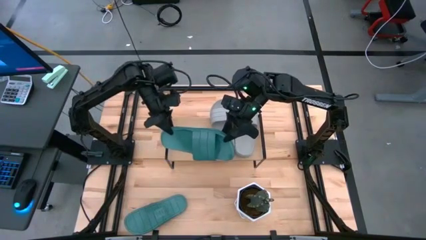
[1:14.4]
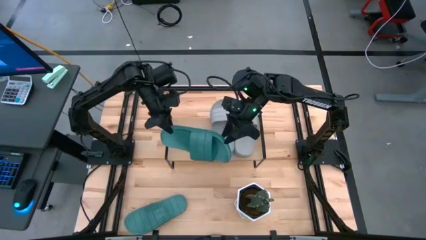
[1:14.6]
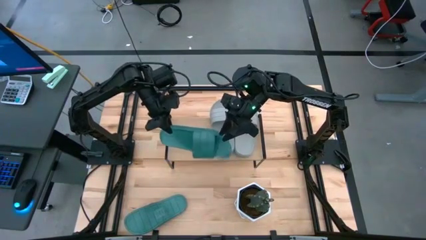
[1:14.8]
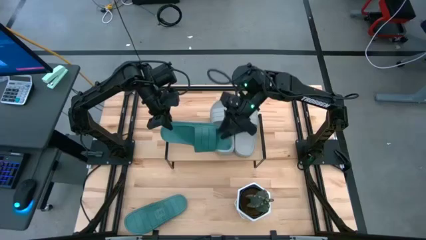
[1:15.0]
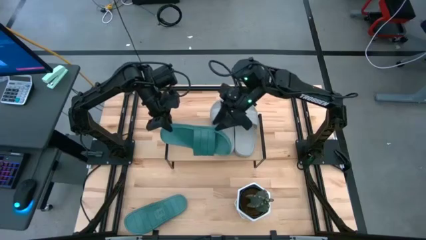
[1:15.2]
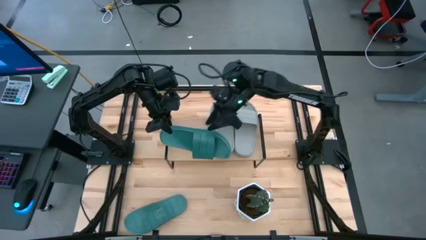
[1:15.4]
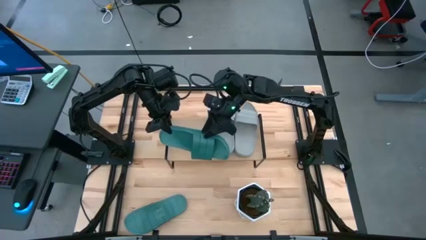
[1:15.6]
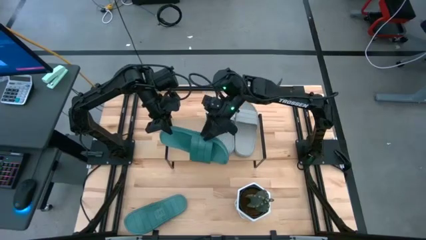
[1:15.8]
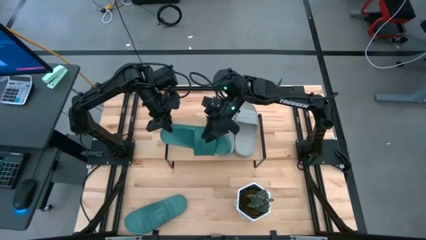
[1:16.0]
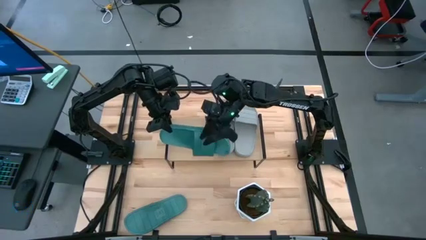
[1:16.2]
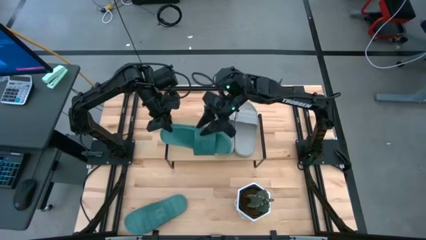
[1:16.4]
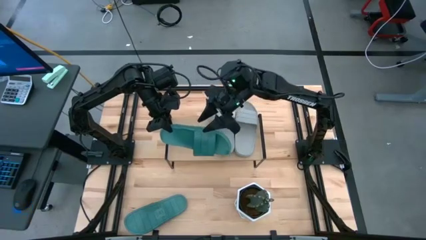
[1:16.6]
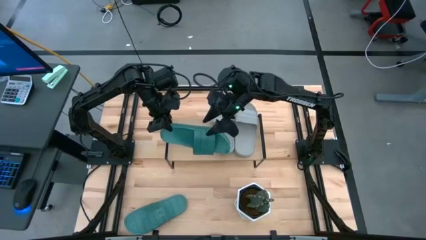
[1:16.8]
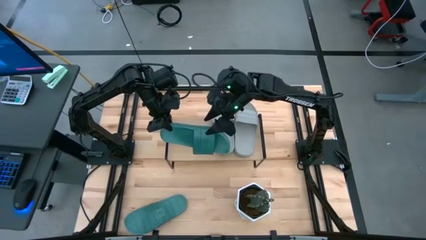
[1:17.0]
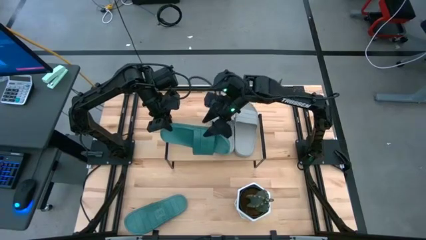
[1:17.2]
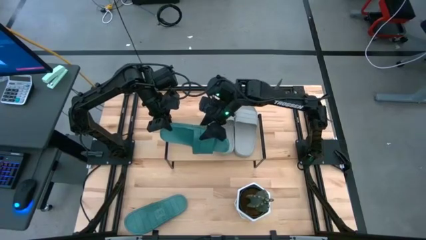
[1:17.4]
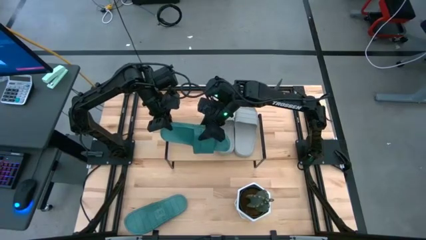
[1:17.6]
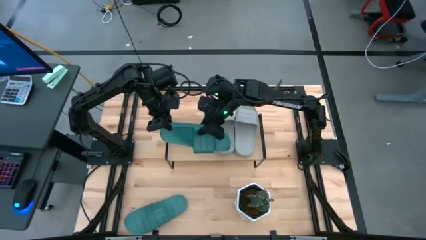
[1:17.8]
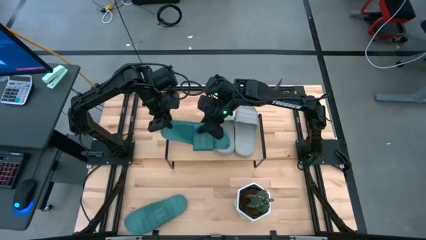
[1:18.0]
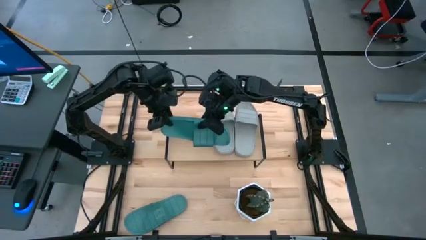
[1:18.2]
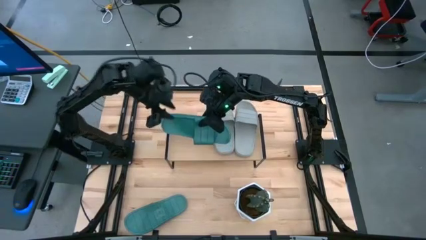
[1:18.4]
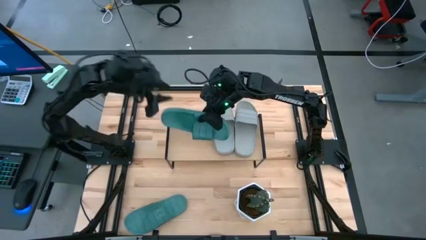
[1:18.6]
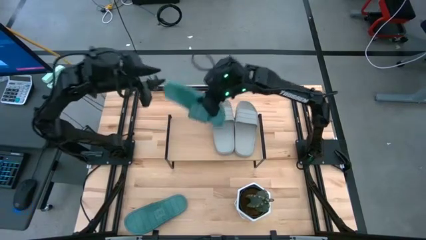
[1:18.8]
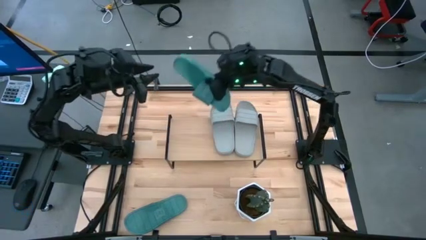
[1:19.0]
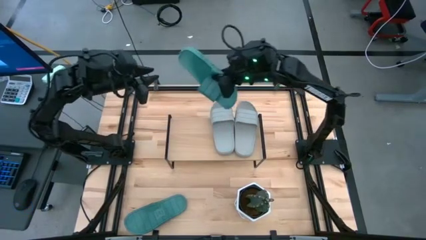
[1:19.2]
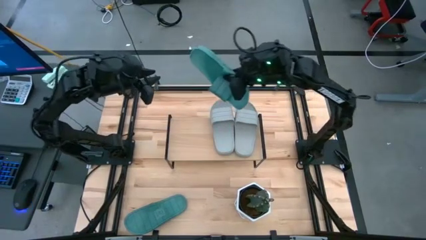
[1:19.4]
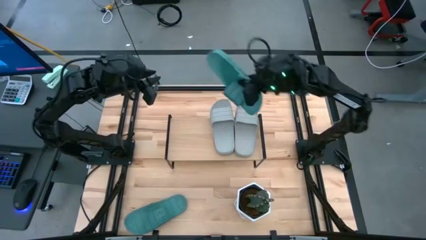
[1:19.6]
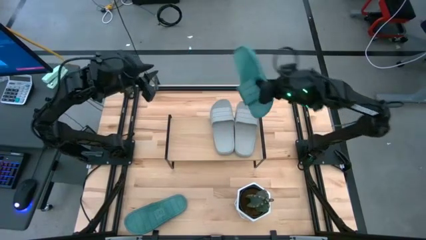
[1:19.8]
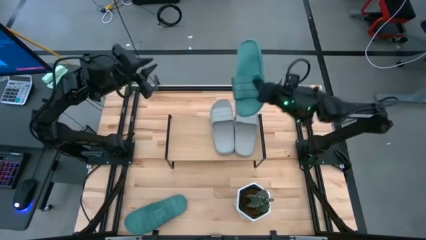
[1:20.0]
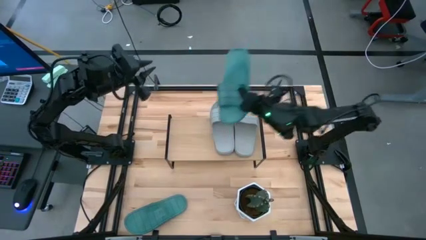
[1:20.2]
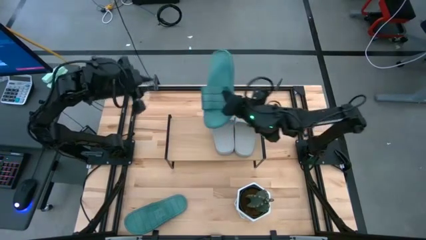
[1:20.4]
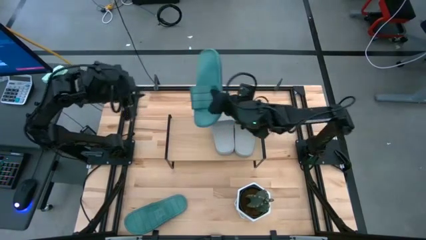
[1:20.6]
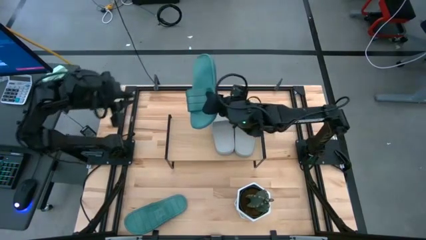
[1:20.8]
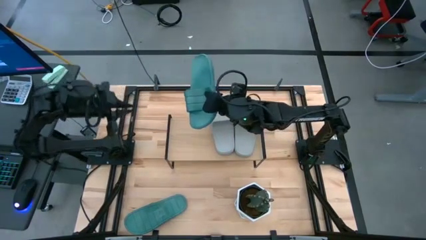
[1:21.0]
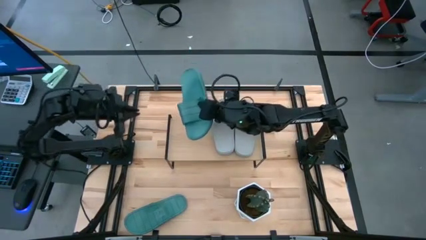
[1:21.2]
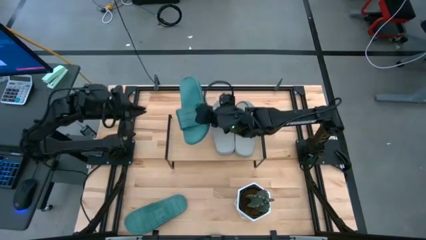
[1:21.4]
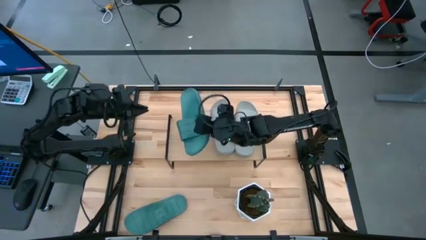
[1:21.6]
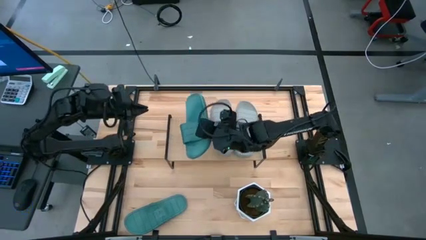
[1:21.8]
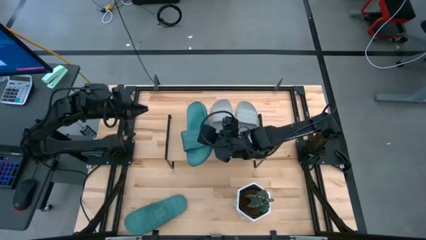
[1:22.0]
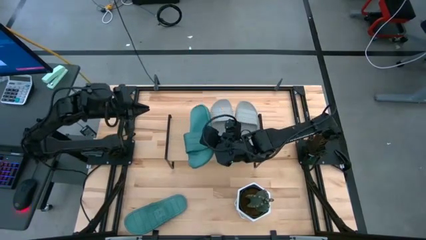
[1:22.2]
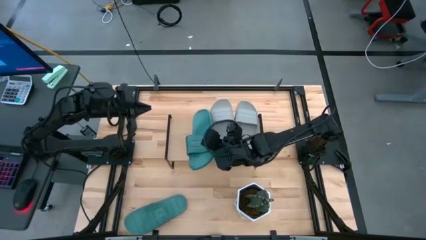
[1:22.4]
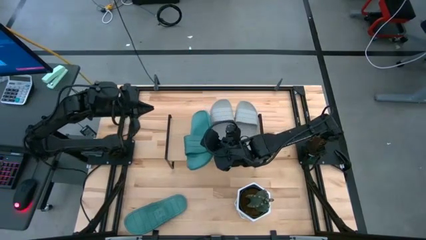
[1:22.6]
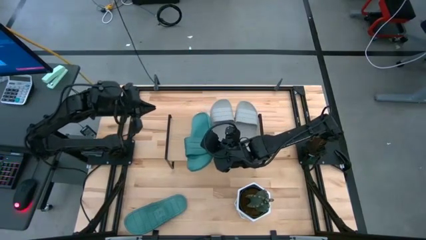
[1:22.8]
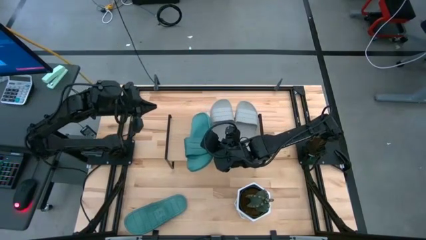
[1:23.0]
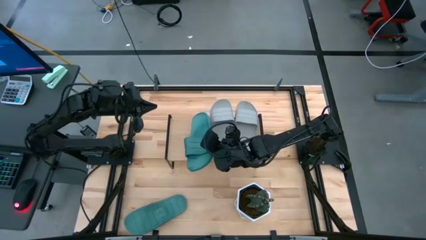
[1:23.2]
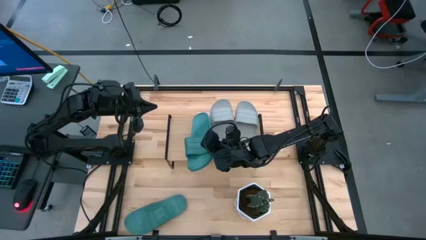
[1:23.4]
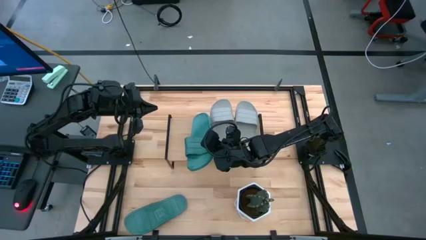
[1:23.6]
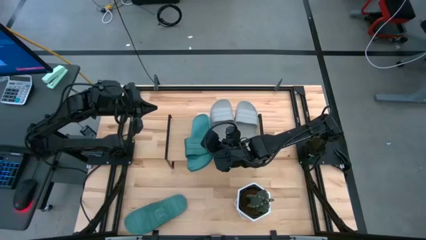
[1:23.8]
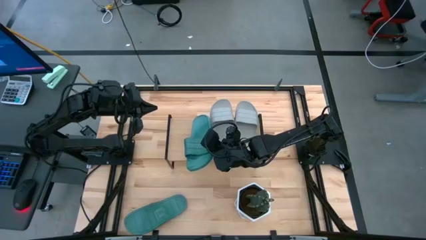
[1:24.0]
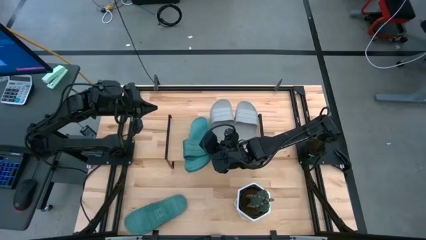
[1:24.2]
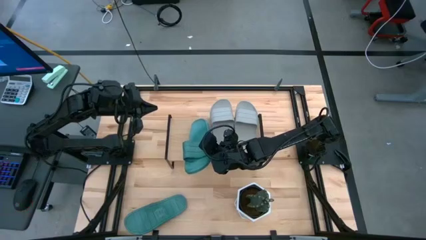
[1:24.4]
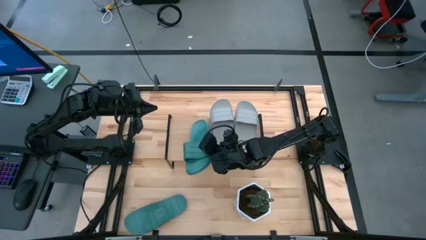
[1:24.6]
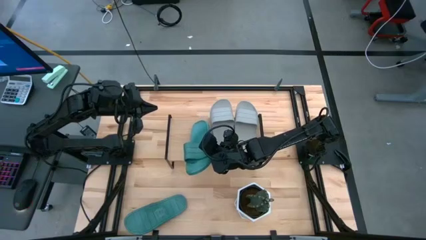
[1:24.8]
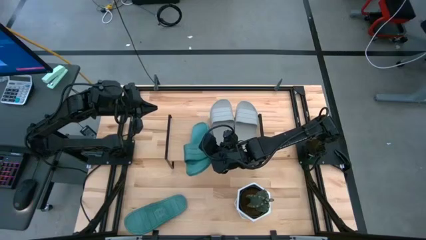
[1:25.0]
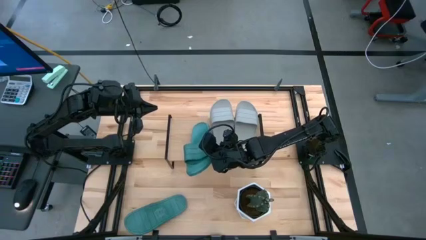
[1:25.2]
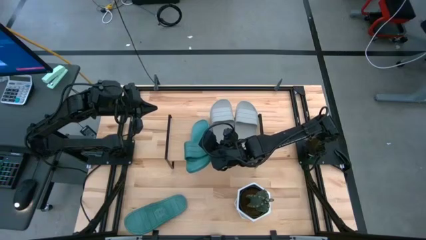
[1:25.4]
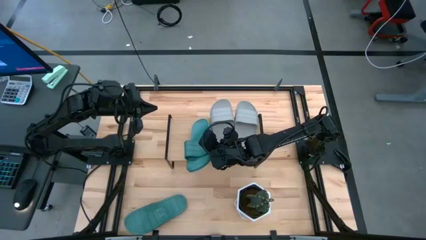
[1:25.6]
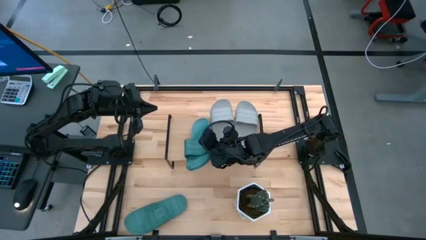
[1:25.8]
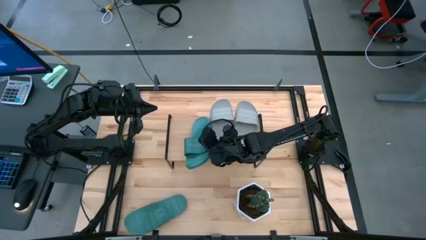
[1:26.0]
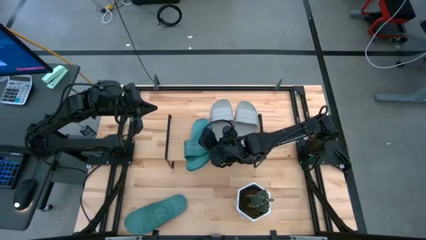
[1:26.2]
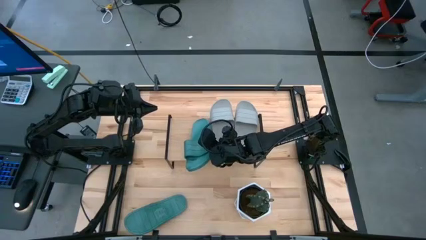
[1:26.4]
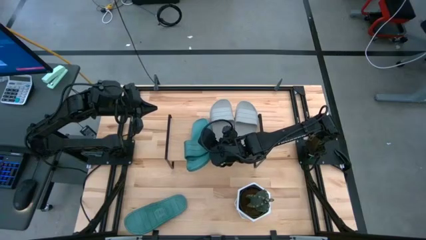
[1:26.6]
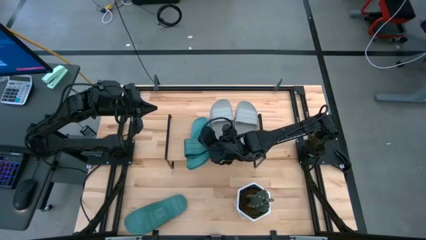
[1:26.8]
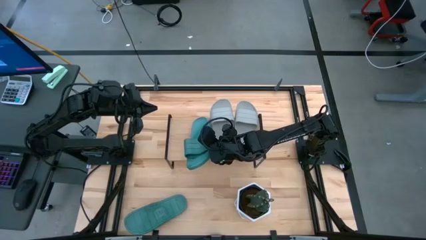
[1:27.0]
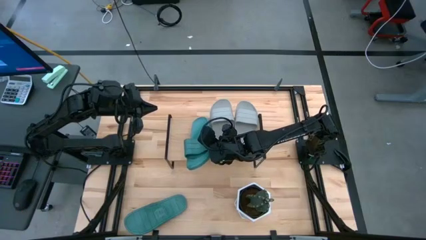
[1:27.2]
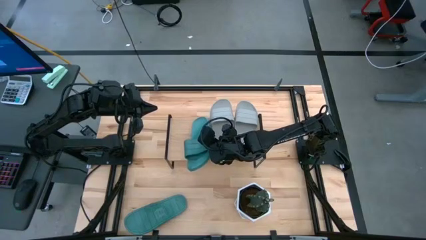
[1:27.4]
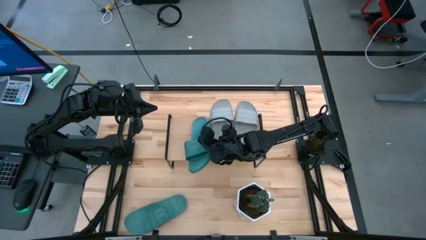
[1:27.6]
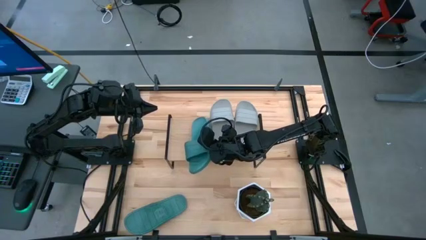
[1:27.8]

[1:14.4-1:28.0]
Task: Pick and place slides into the shelf
Put the top green slide on the shelf
